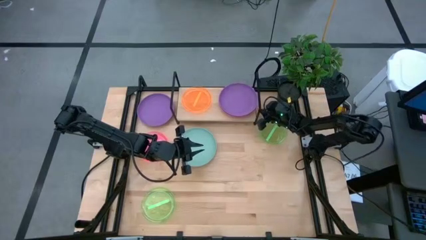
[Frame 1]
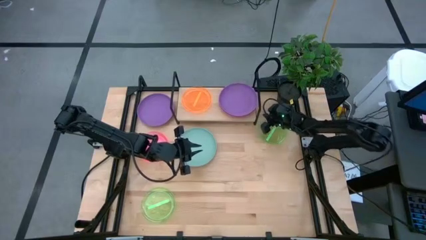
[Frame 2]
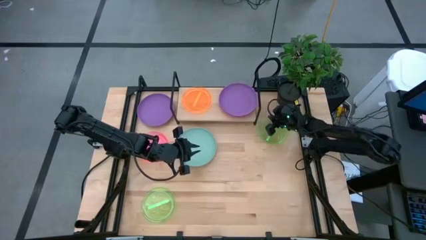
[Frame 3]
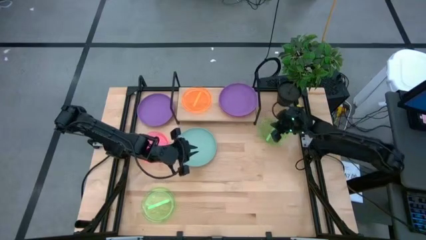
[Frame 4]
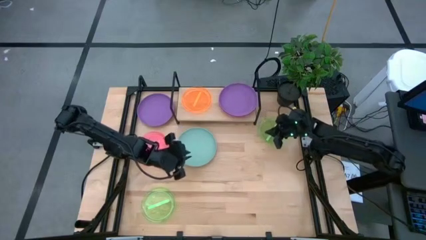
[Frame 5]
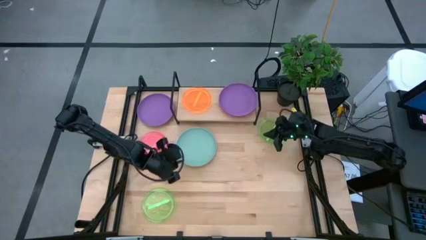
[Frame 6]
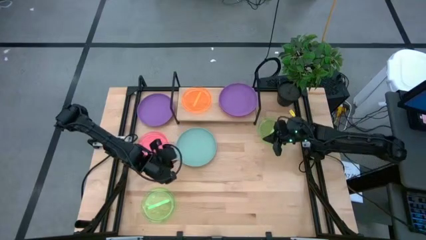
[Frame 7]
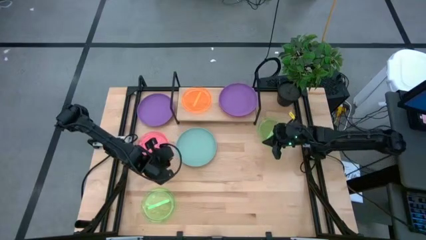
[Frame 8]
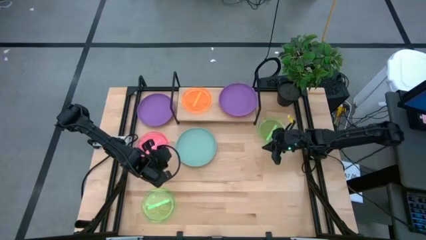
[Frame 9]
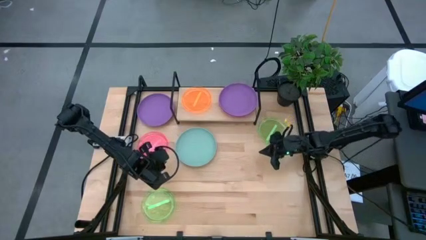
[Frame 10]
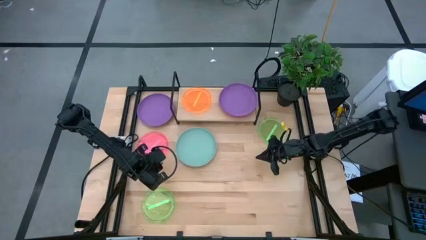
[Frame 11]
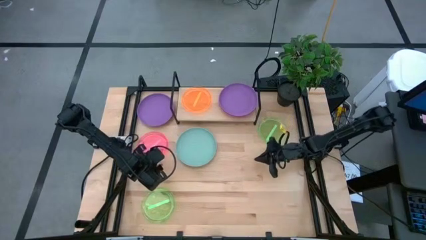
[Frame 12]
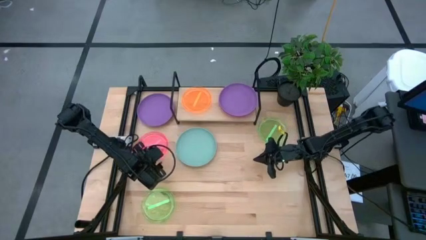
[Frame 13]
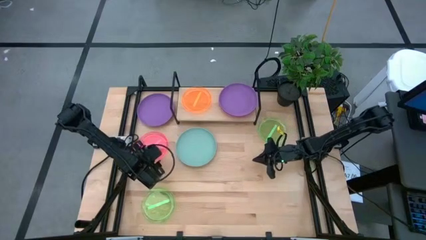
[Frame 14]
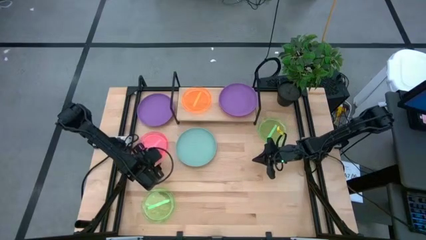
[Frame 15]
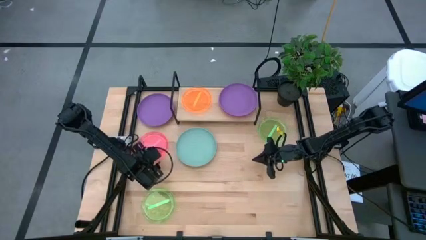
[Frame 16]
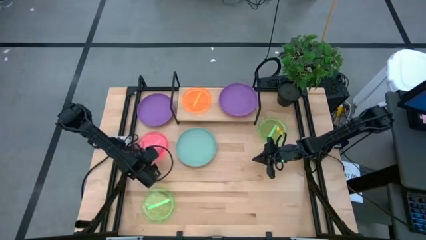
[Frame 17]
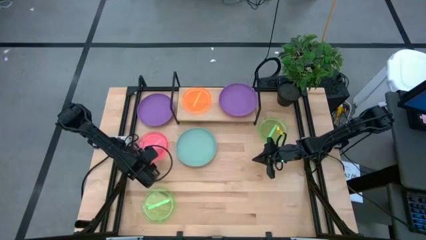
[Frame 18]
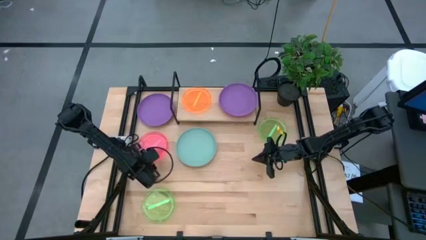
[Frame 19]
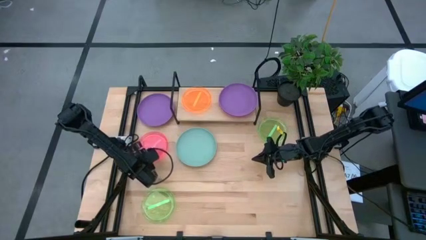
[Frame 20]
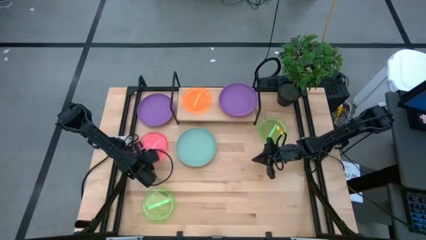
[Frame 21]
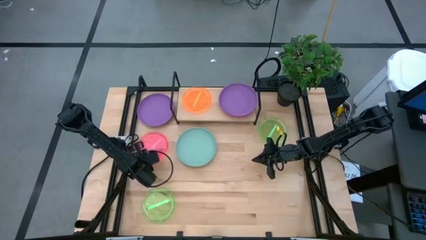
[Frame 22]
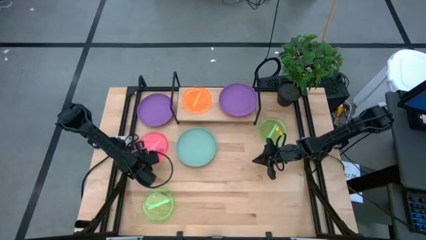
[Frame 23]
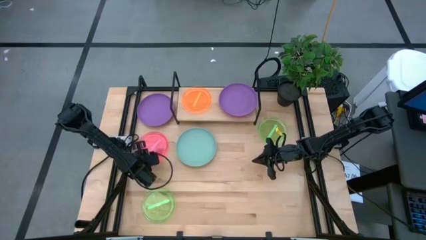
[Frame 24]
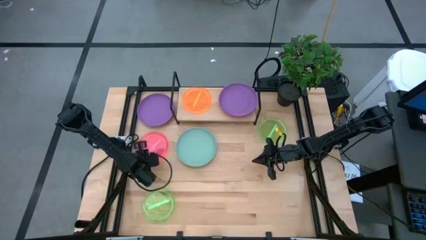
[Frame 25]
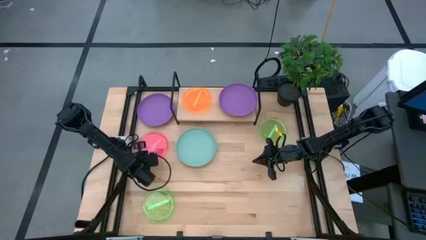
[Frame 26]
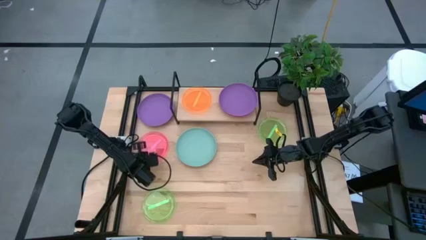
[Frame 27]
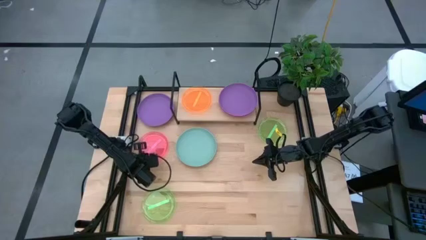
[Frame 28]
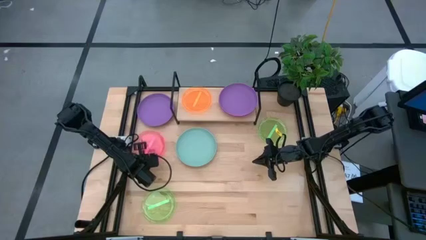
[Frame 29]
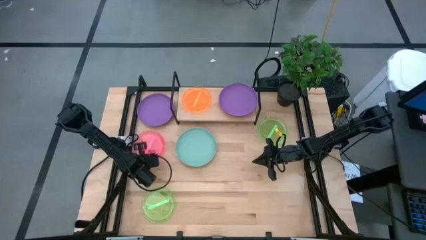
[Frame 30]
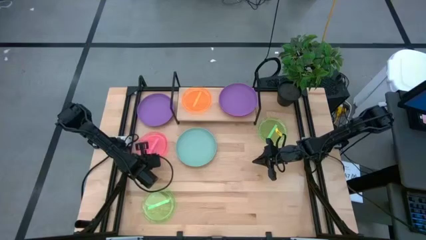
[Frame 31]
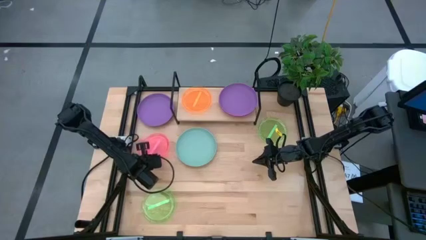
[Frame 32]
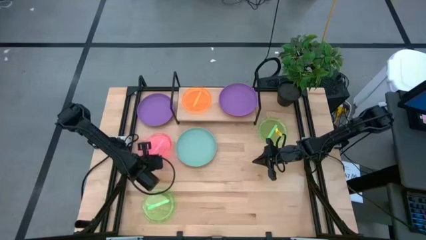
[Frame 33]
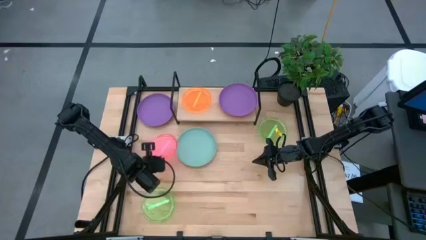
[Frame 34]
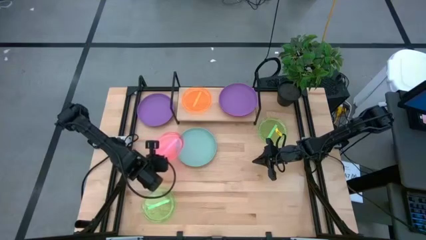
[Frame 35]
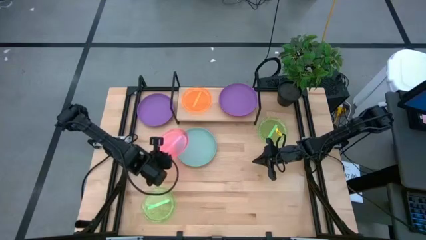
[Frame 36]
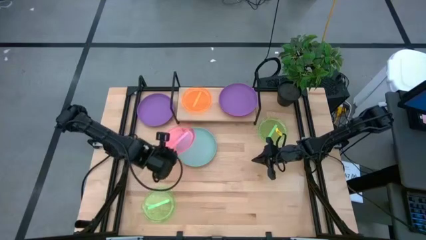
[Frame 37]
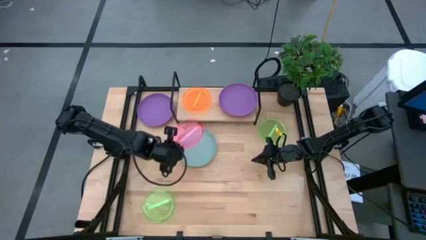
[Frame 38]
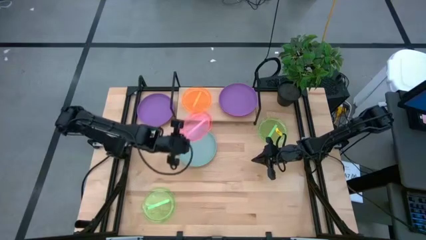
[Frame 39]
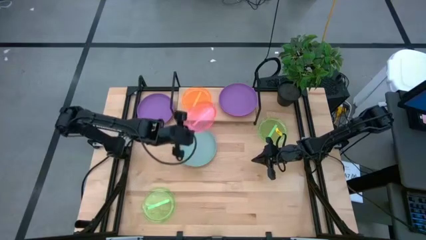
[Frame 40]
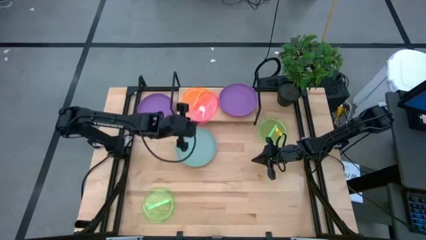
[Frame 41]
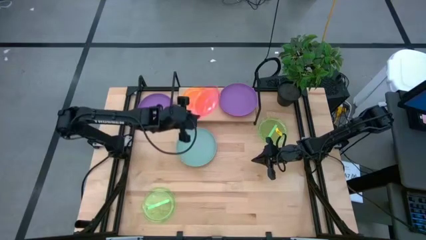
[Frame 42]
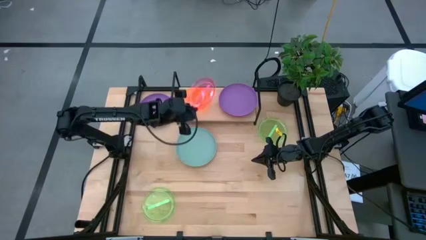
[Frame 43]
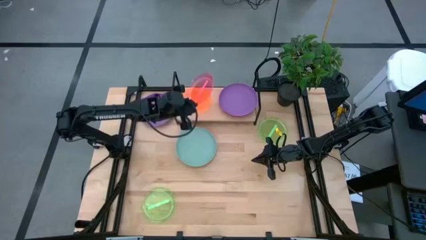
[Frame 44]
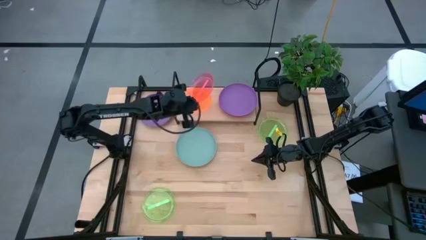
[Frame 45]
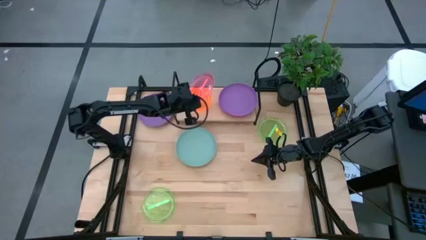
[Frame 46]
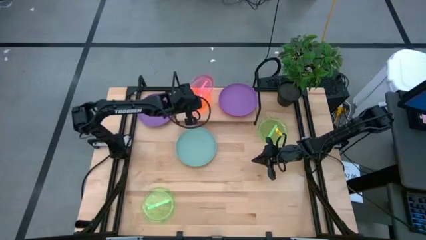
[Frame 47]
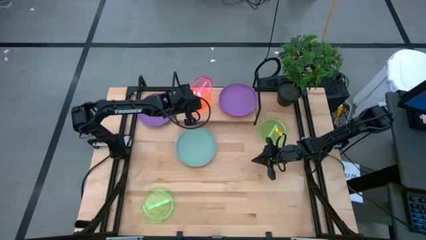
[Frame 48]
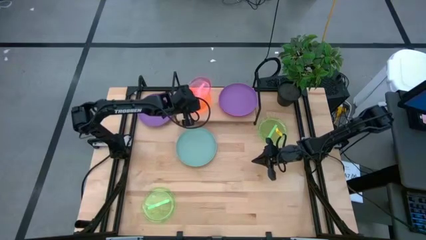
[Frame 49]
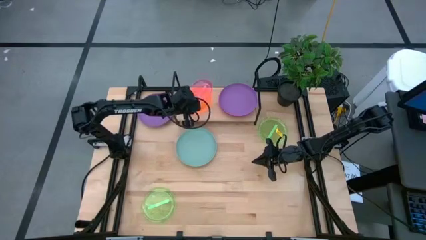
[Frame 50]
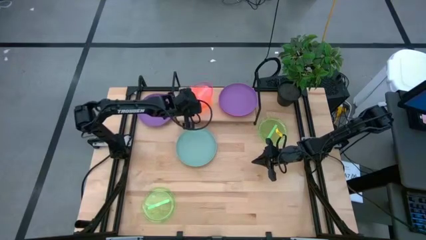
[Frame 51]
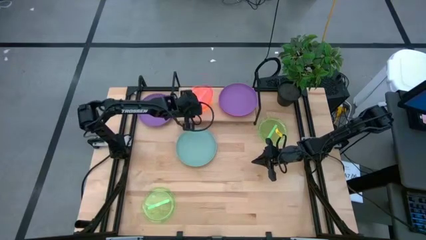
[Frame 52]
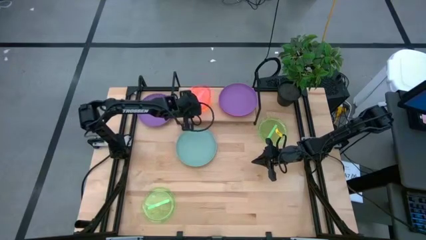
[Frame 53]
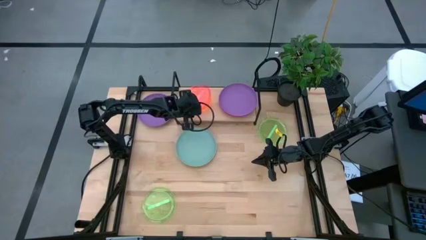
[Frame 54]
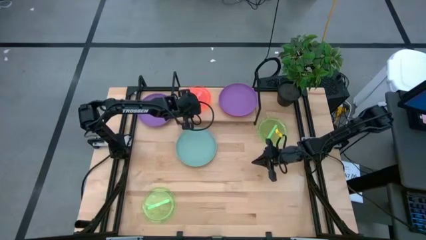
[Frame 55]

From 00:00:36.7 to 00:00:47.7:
Task: Place and stack plates onto a shelf
Stack the small pink plate on top of the orange plate on the shelf

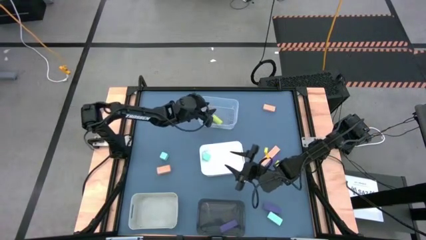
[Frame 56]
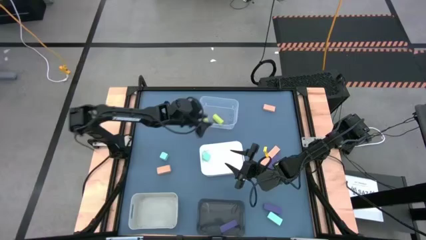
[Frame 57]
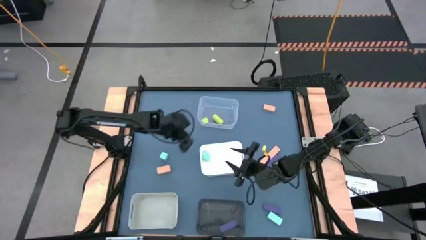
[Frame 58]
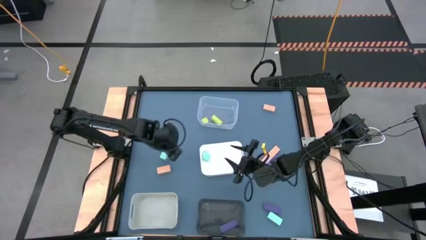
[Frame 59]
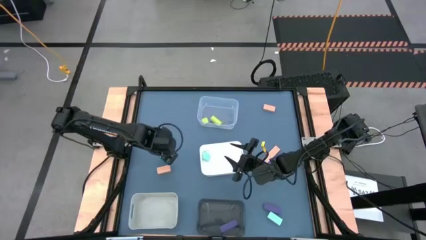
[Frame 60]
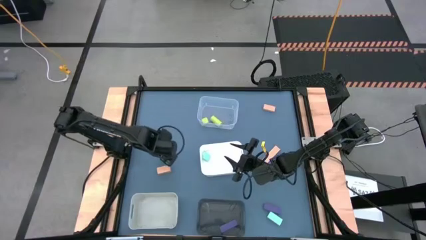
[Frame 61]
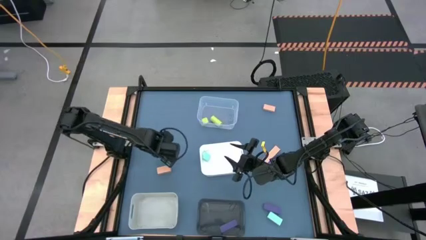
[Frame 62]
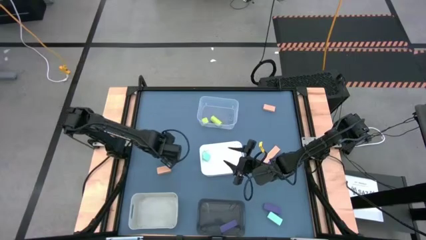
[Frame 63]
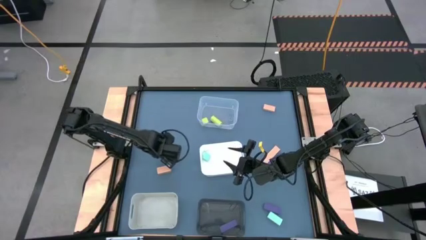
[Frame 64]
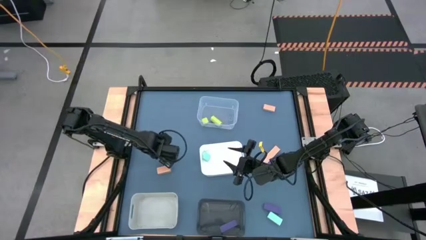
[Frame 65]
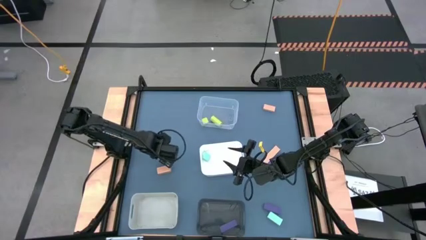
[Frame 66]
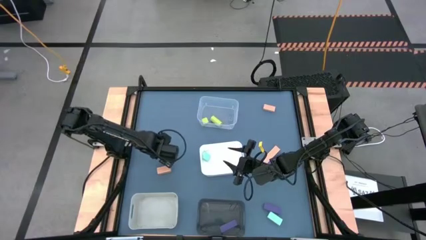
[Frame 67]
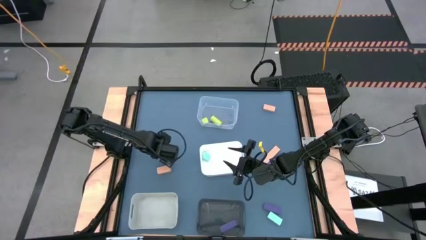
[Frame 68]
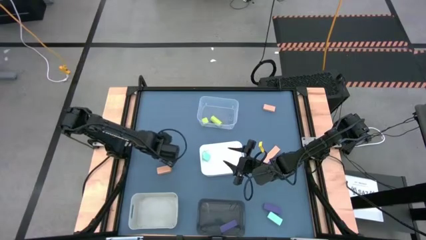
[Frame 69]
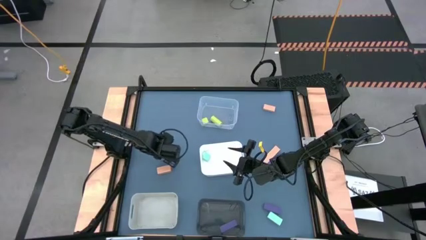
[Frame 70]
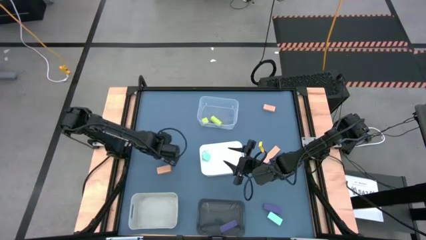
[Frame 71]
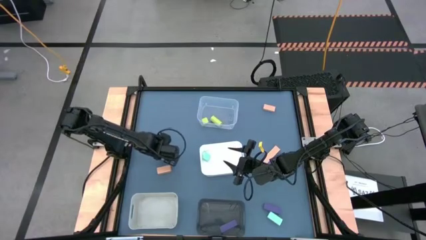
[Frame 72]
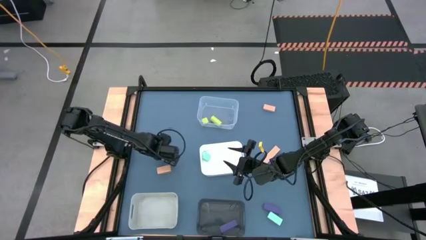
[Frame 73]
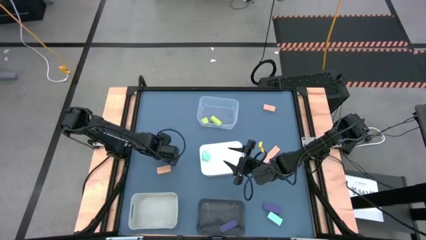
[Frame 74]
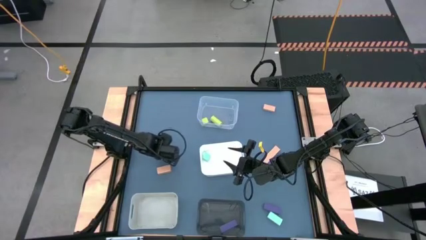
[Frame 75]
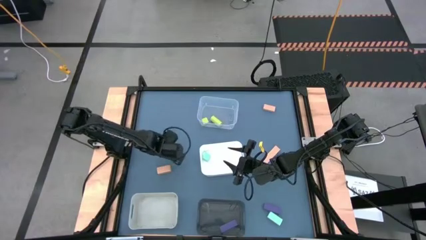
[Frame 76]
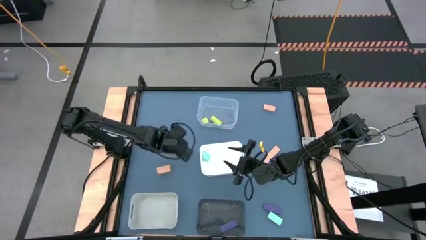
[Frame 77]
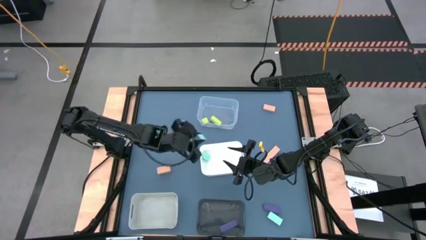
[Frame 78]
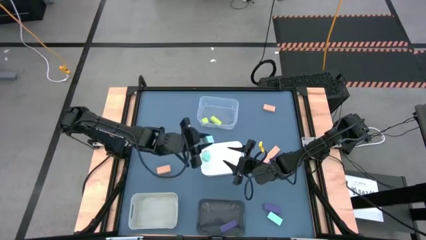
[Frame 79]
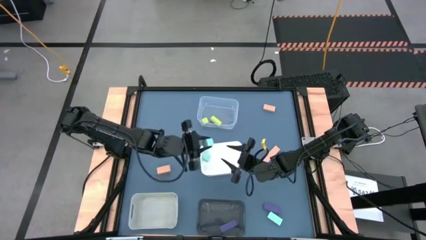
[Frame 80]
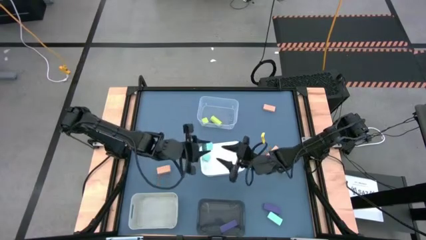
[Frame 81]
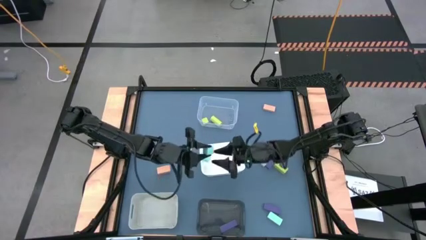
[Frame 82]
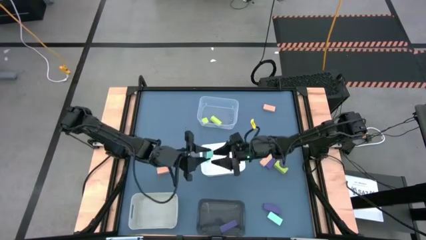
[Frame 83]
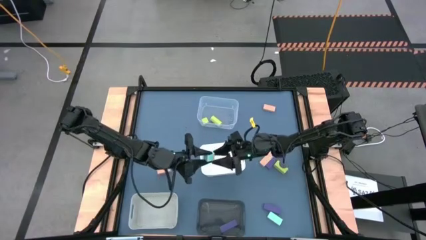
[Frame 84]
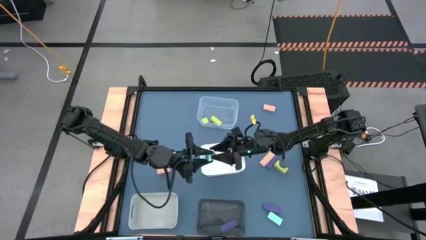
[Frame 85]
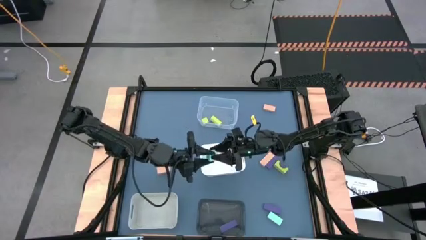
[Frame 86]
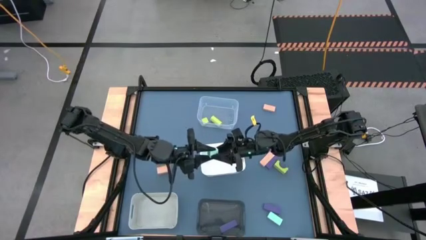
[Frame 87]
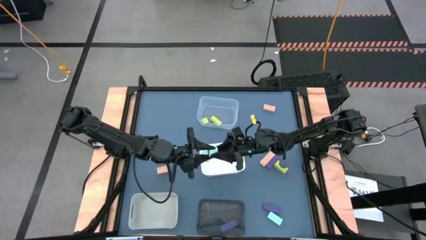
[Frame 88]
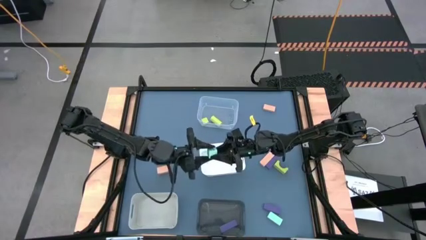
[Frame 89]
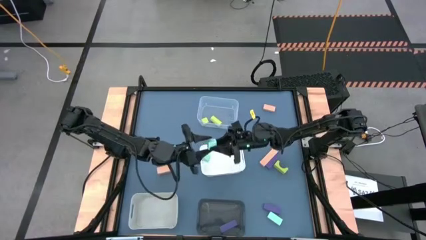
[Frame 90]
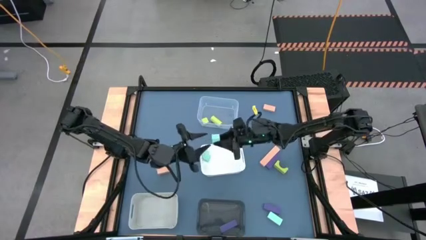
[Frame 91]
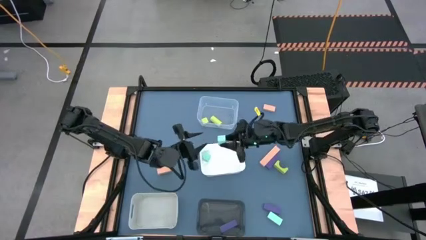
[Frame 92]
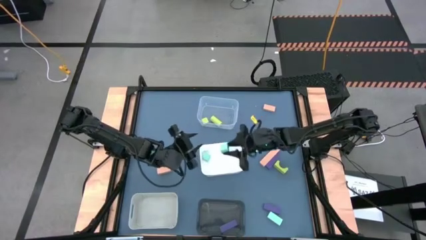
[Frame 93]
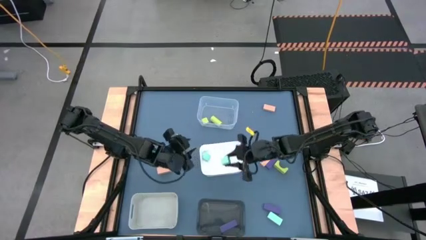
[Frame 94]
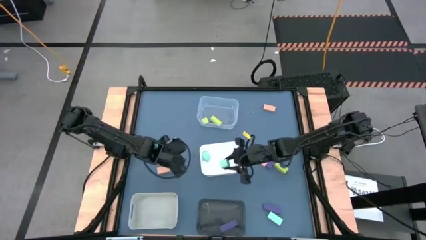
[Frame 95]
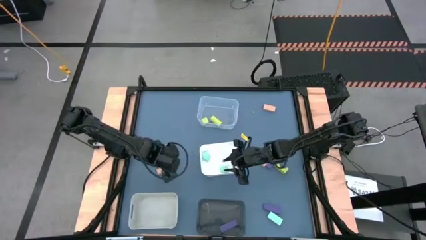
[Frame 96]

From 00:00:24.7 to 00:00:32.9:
Task: Sort & place blocks by color
Put the left blue block into the white bin
